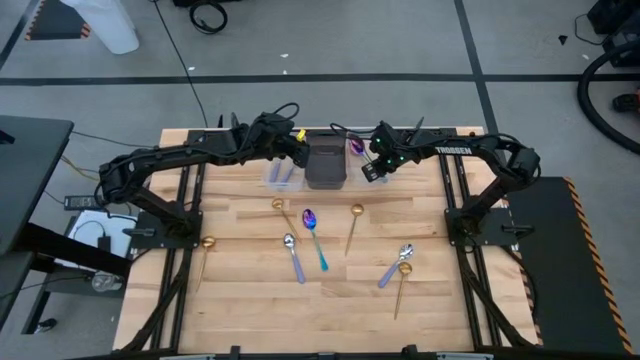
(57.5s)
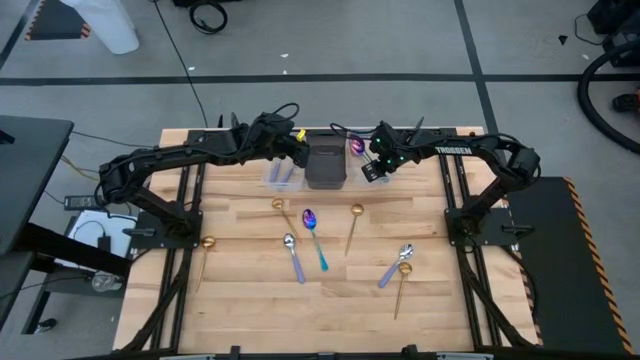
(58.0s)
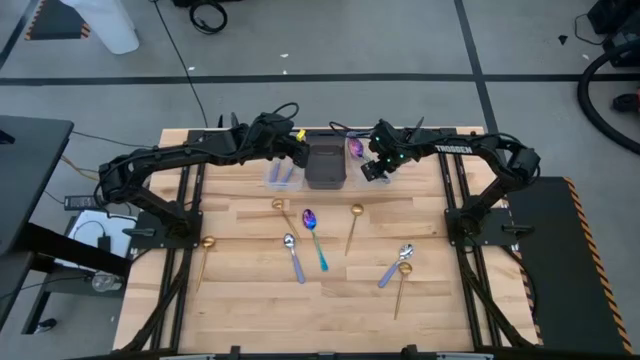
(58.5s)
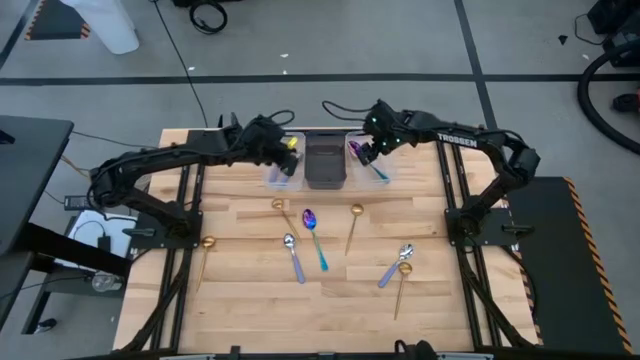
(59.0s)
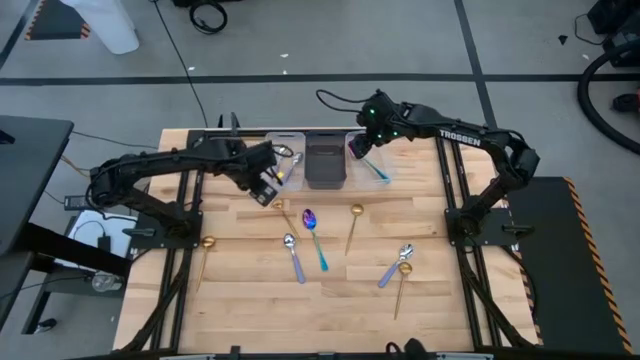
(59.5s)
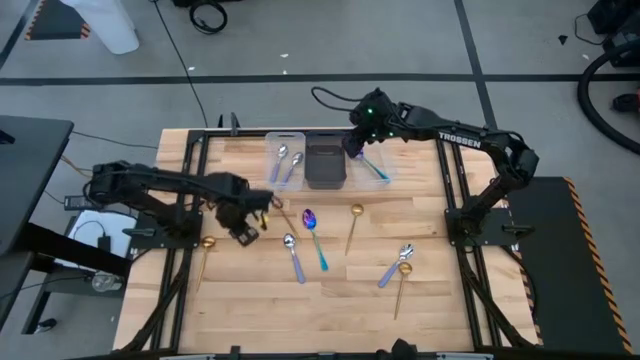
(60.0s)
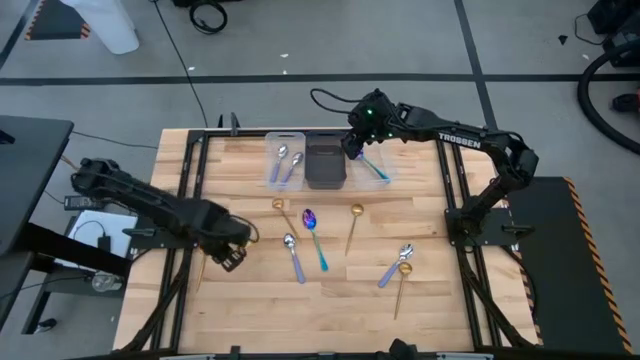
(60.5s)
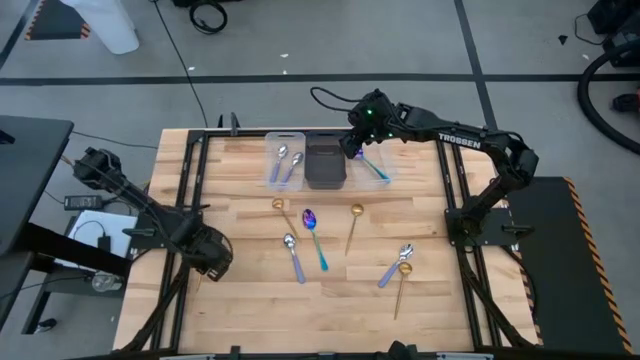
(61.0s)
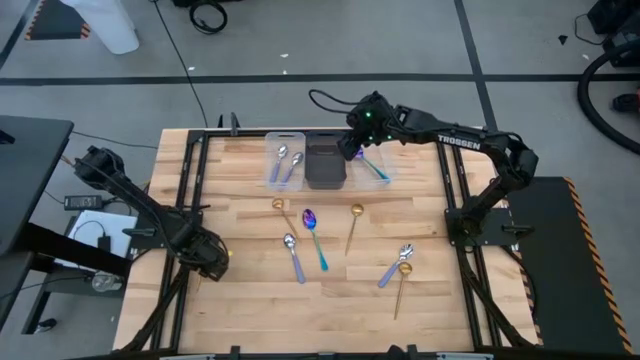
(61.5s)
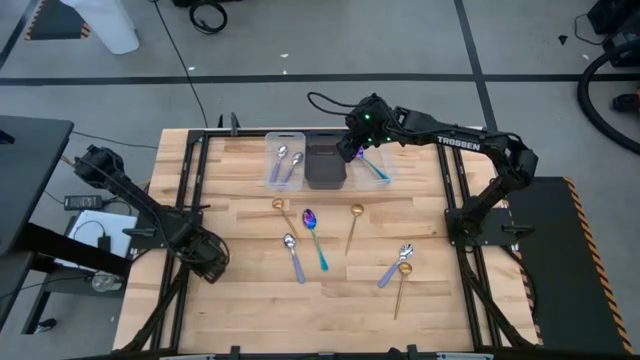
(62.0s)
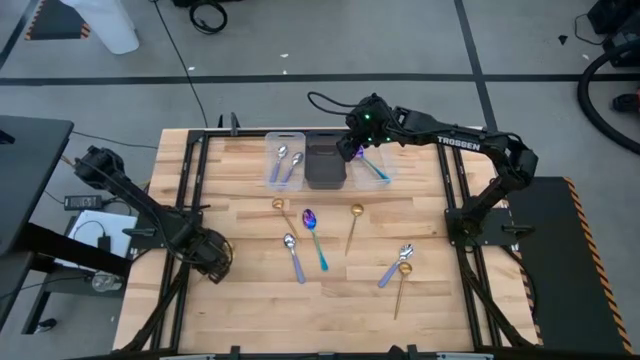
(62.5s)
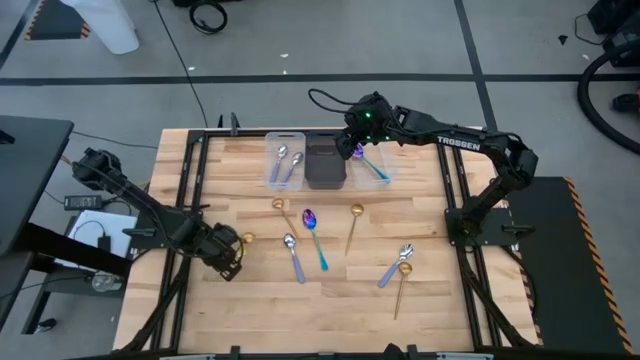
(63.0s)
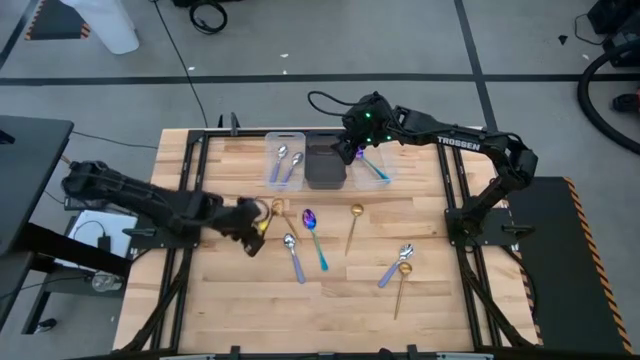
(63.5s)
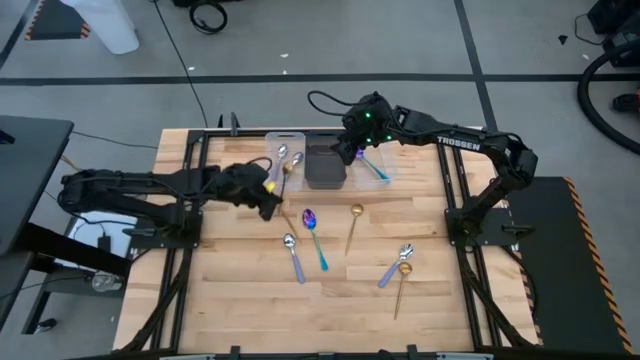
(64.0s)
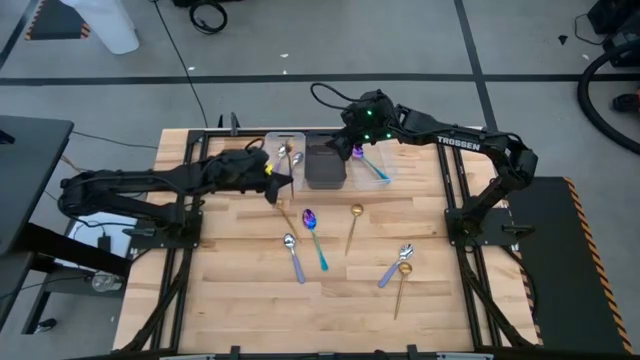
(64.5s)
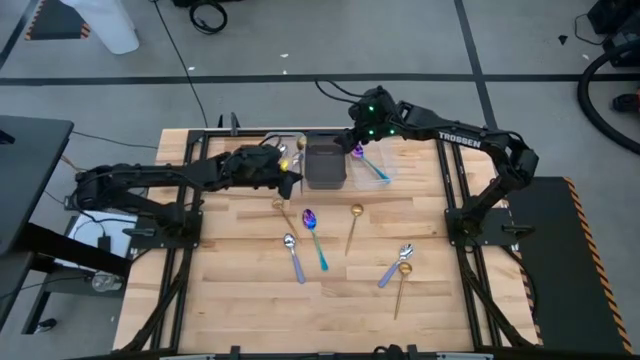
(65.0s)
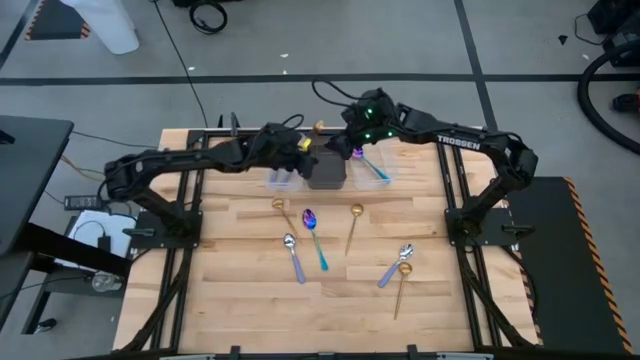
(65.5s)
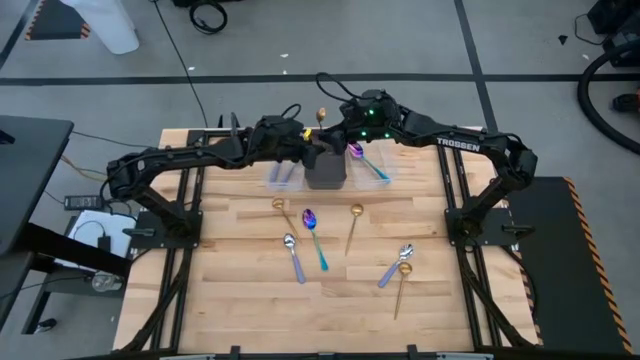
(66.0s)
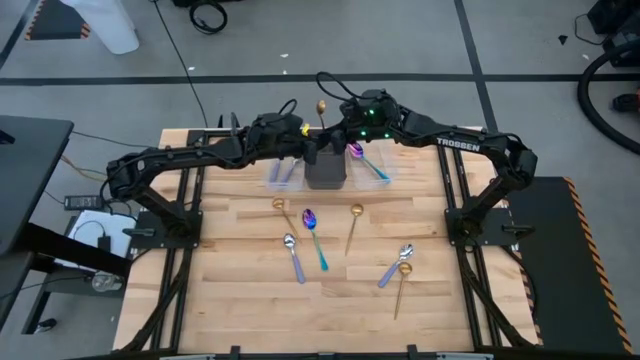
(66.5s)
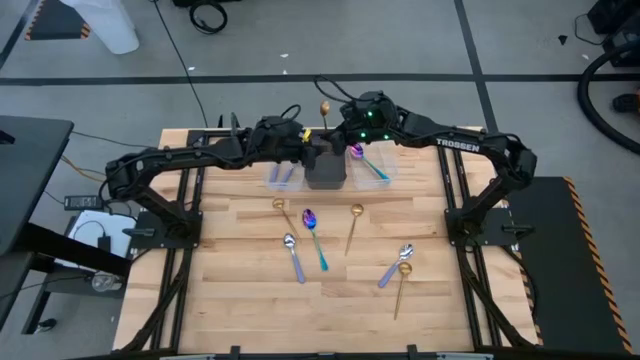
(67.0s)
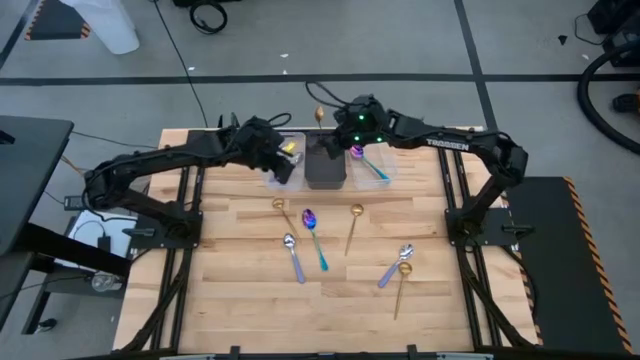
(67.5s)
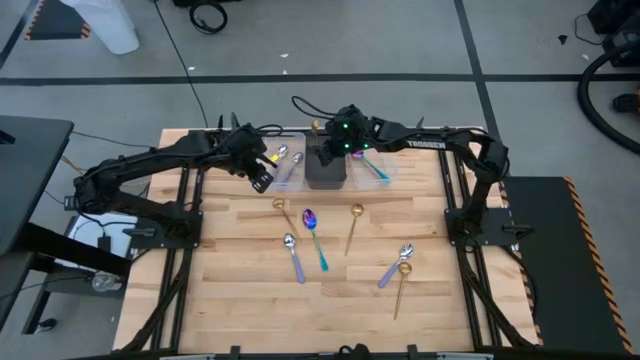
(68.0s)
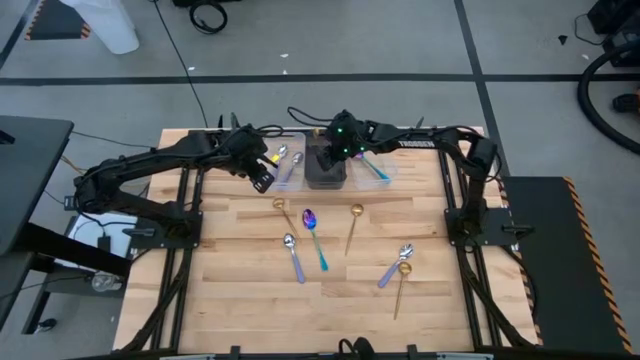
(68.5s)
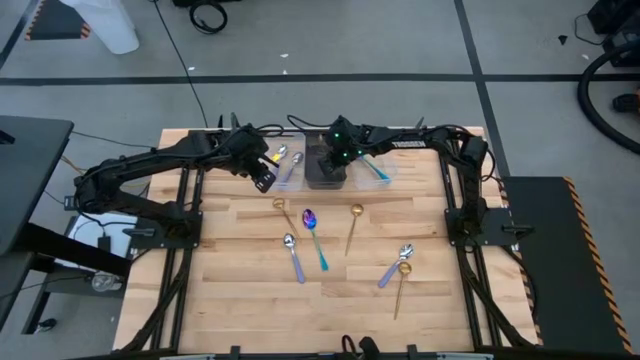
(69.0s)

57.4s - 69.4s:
Task: Sort silverware by color (type)
Put the bottom left gold spoon into the black bin

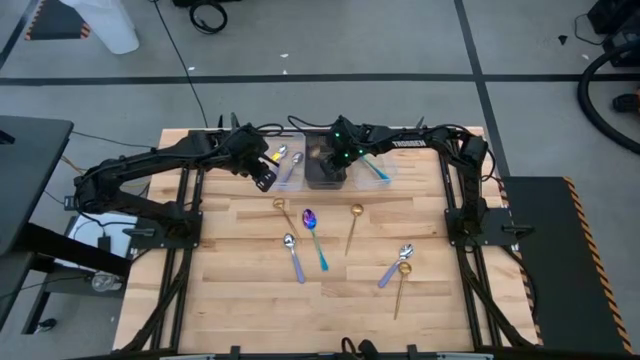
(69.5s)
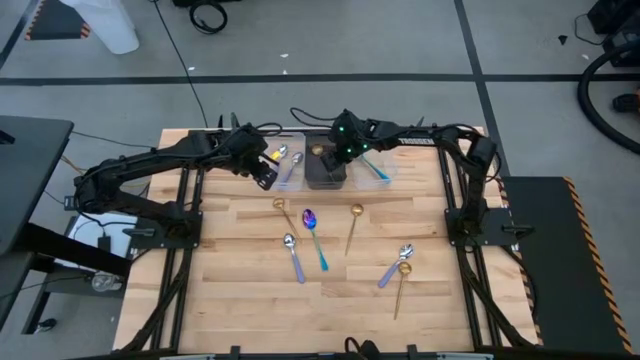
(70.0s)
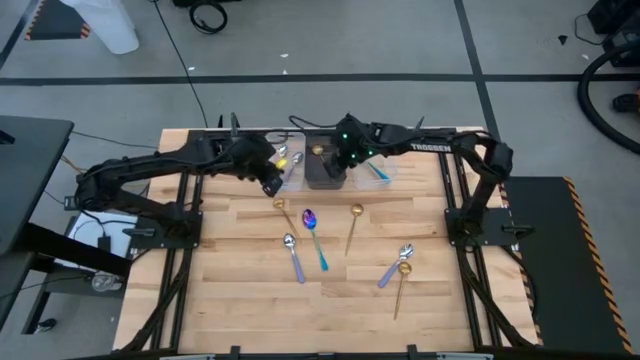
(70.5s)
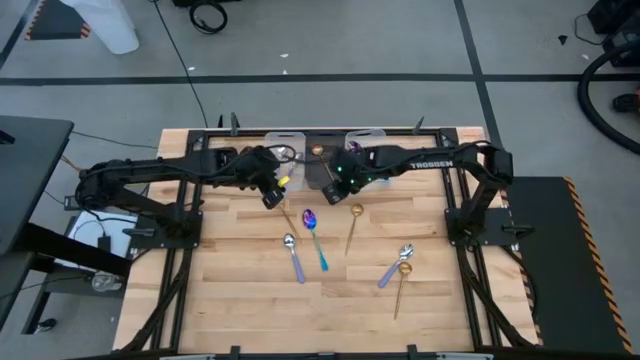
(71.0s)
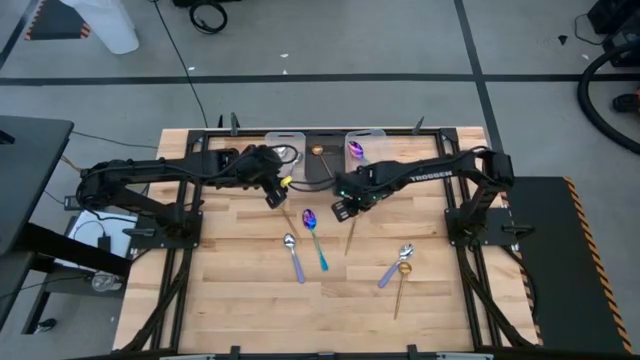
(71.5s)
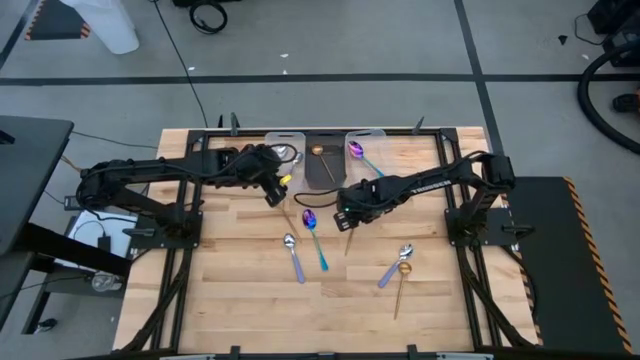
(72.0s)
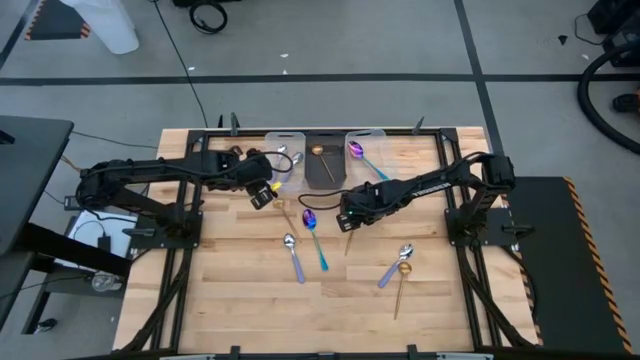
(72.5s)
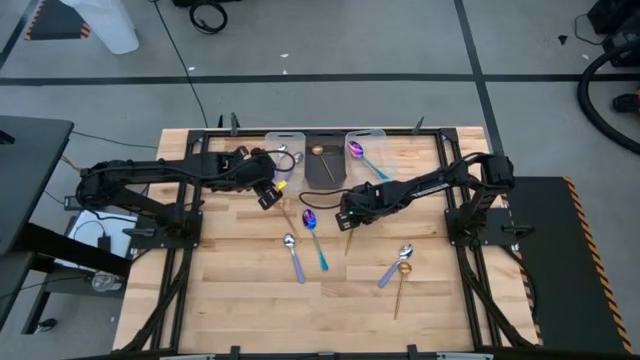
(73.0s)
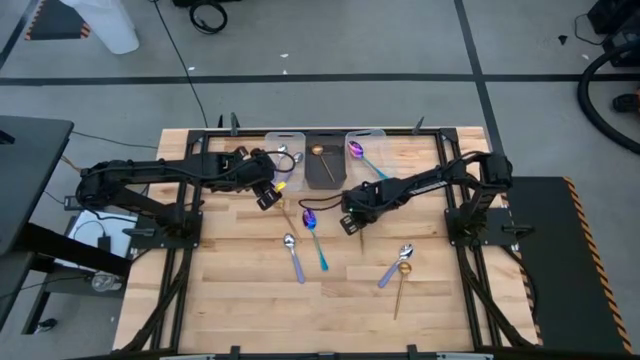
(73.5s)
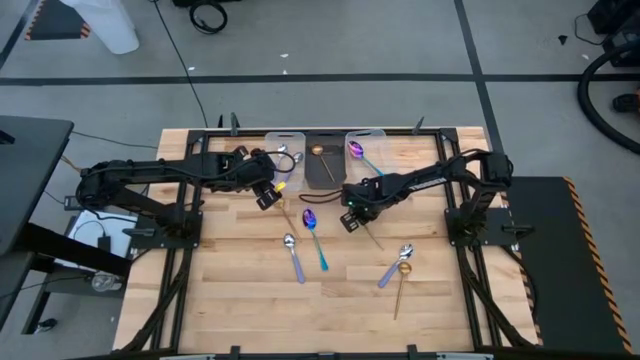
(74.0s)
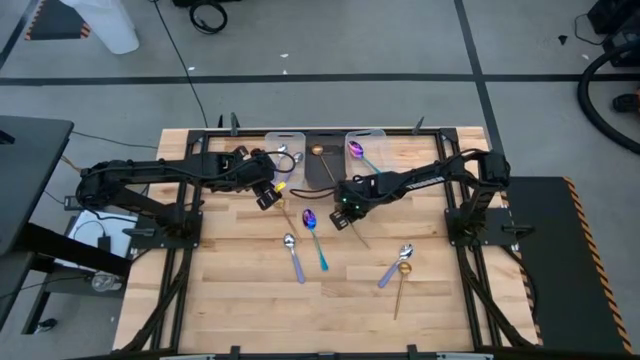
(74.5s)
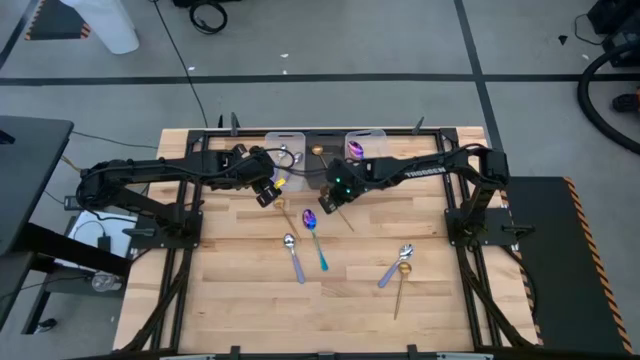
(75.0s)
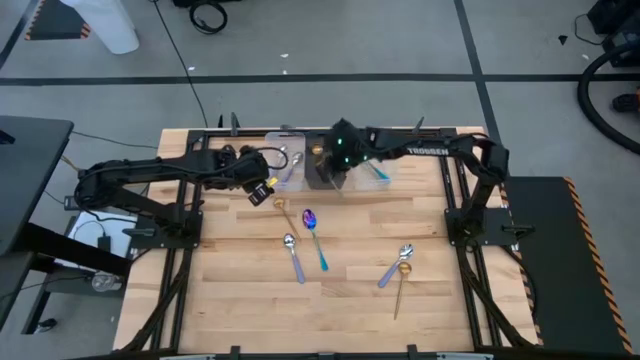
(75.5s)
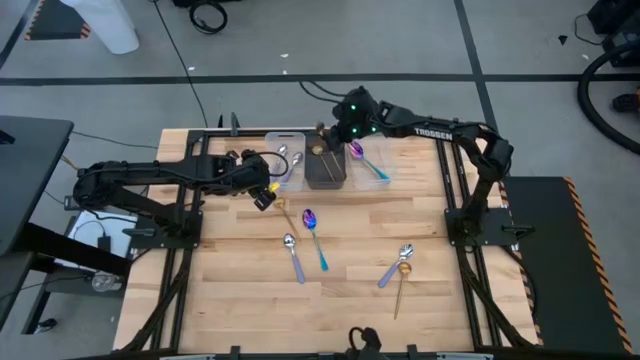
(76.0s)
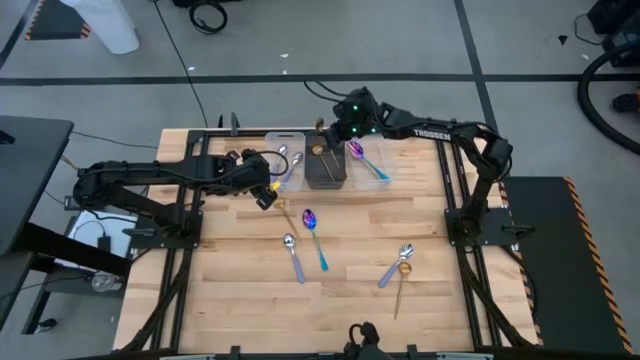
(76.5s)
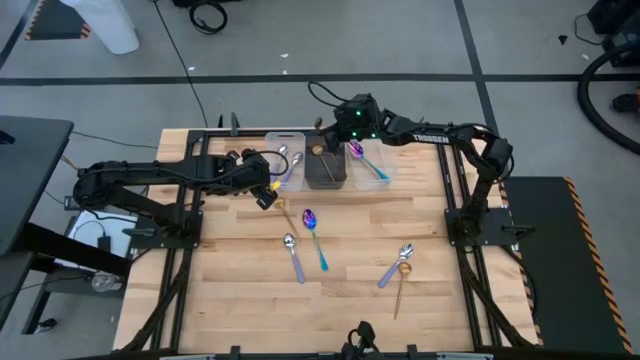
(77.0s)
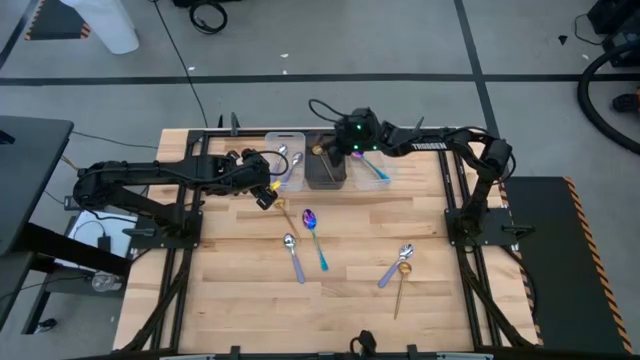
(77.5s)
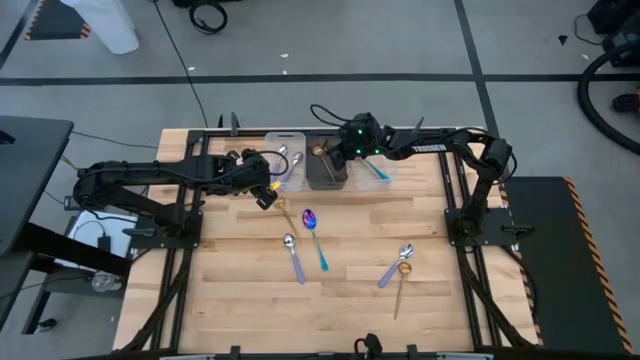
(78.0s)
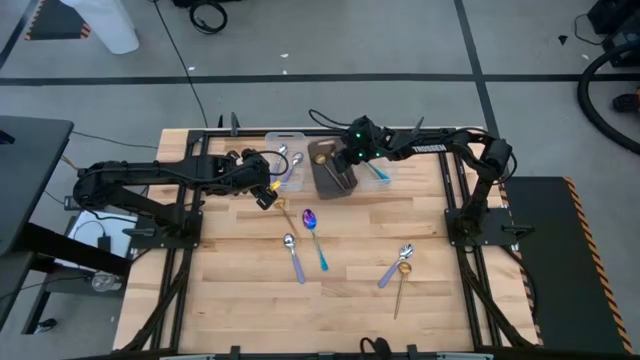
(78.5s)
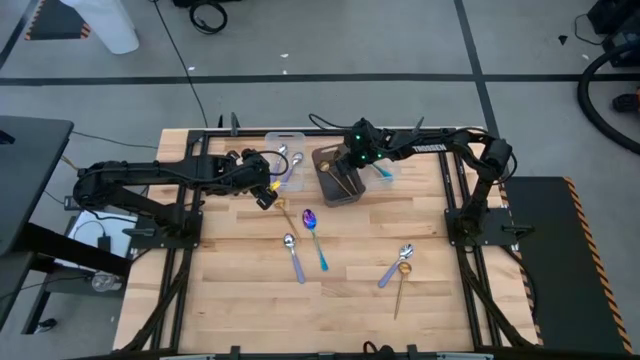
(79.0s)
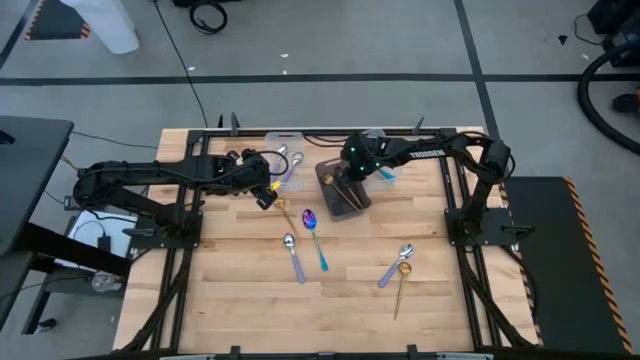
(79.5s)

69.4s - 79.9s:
Put the top right gold spoon into the black bin

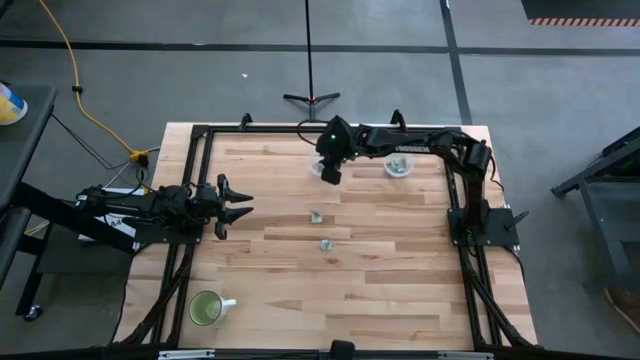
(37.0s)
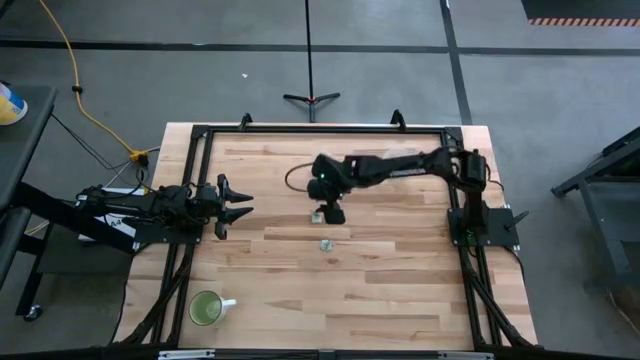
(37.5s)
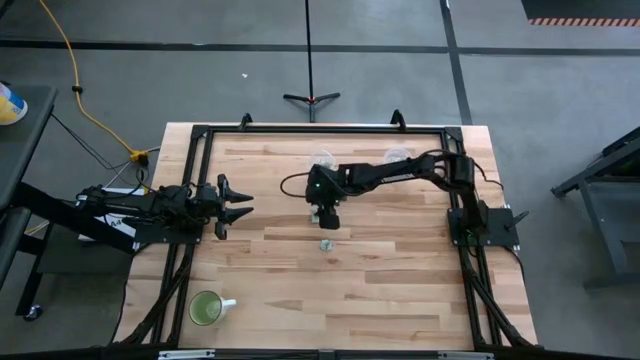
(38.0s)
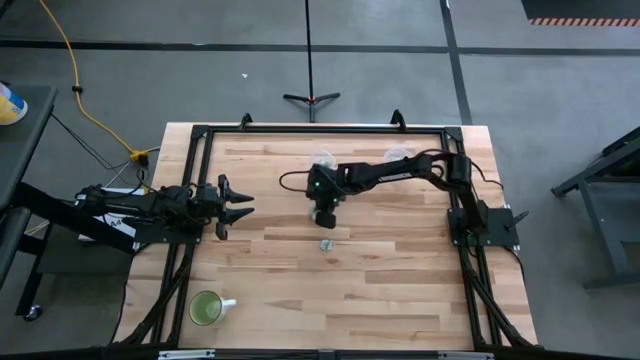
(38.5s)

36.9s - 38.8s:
Task: Pick and place Stevia / Truvia into bins
Put the stevia packet into the right transparent container
